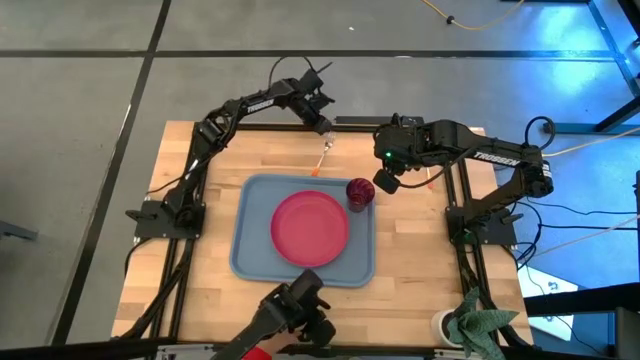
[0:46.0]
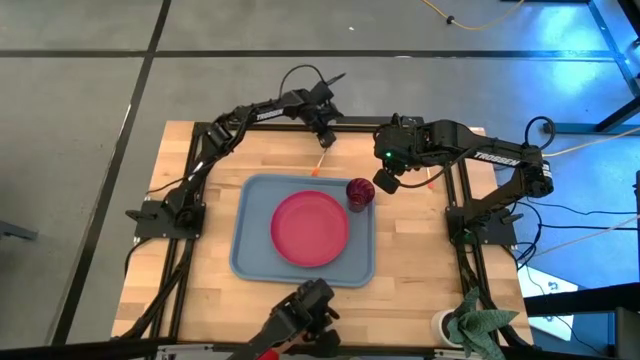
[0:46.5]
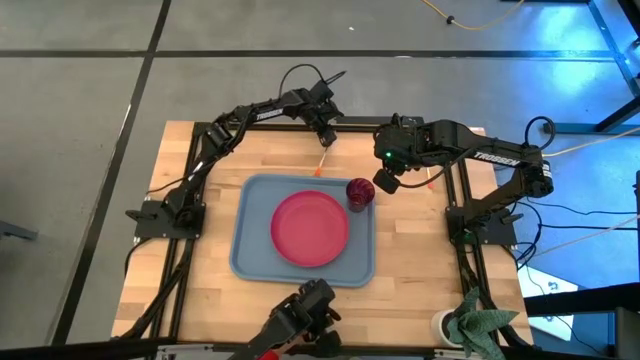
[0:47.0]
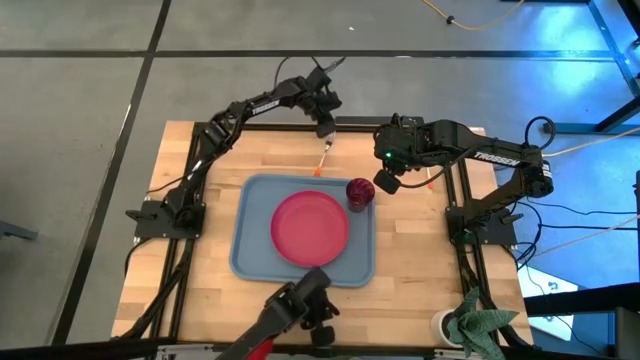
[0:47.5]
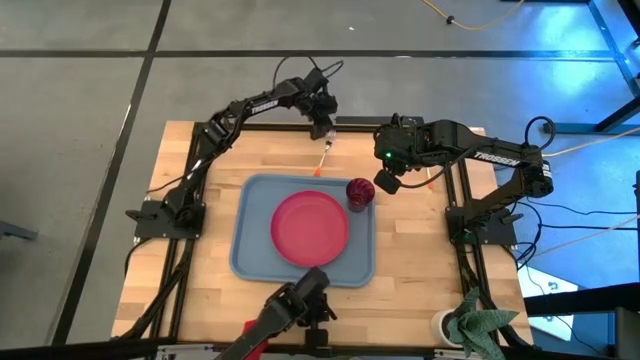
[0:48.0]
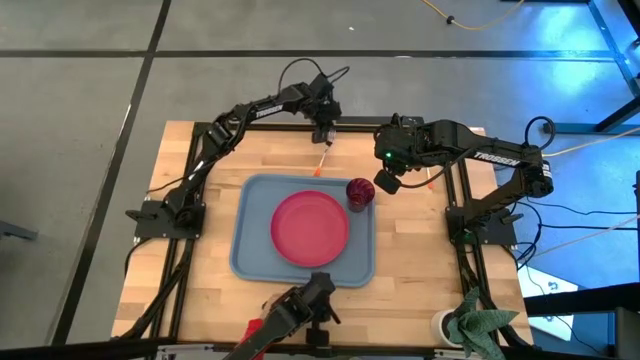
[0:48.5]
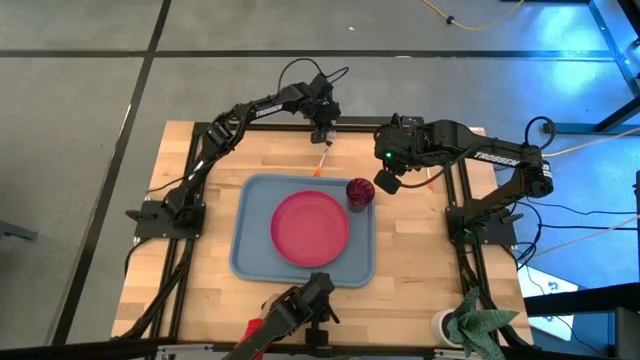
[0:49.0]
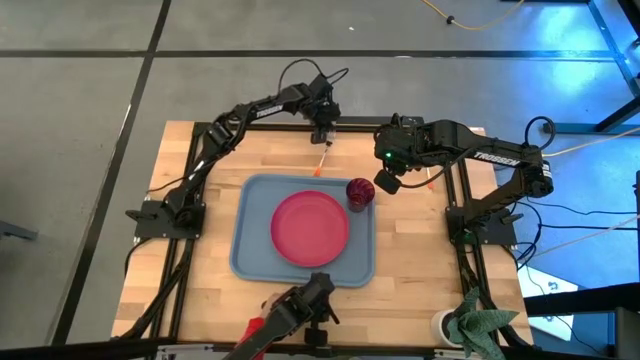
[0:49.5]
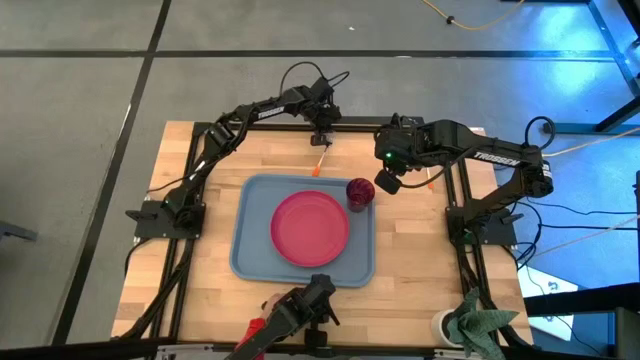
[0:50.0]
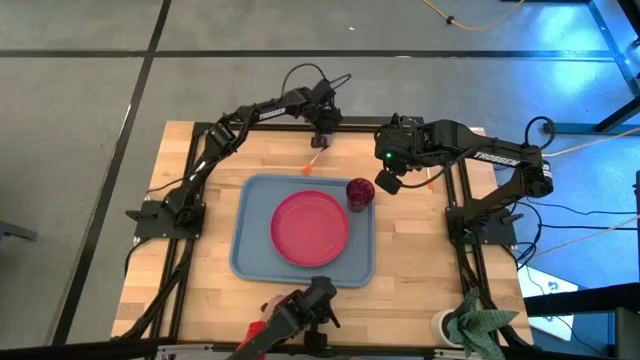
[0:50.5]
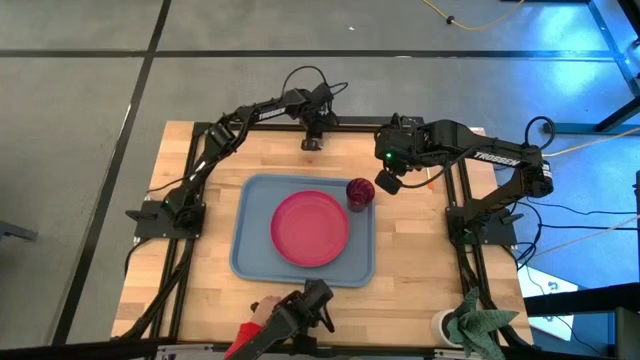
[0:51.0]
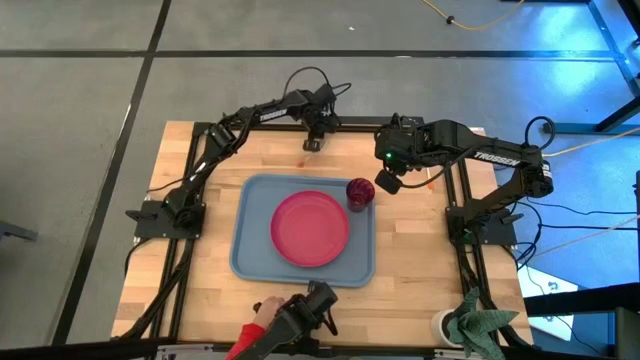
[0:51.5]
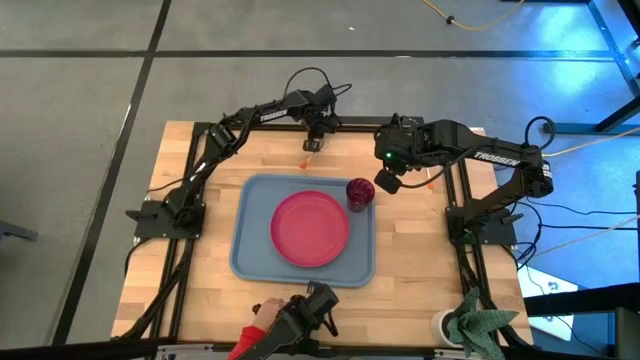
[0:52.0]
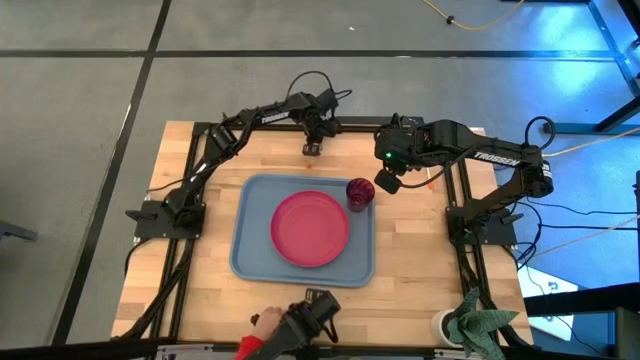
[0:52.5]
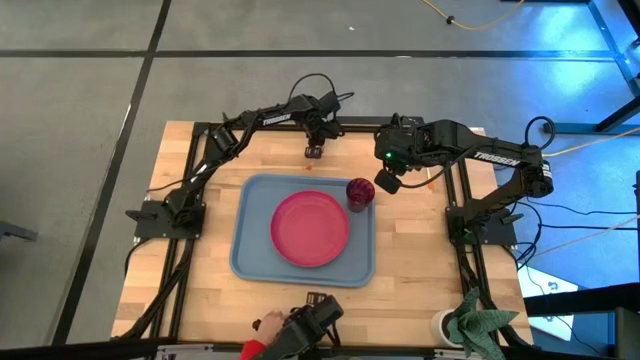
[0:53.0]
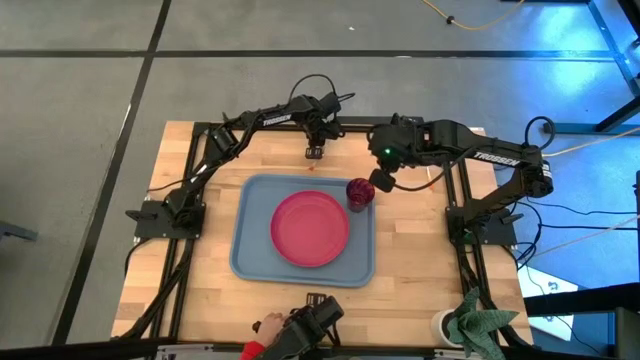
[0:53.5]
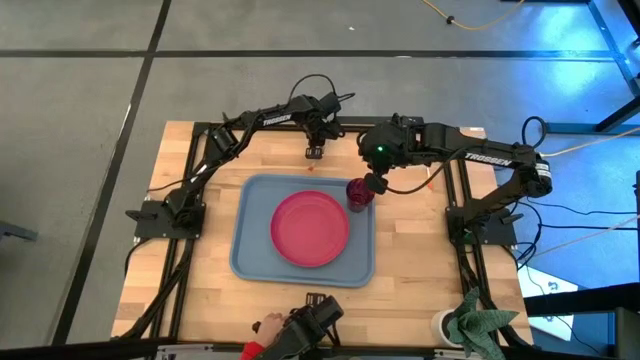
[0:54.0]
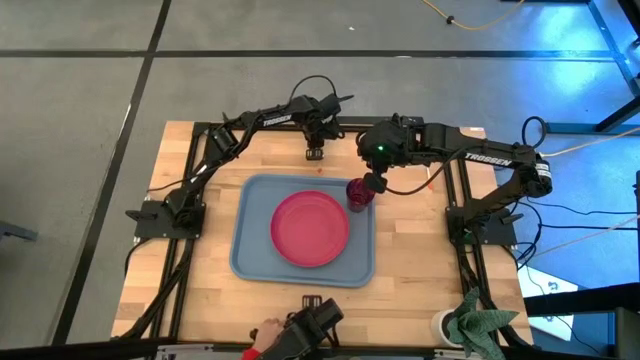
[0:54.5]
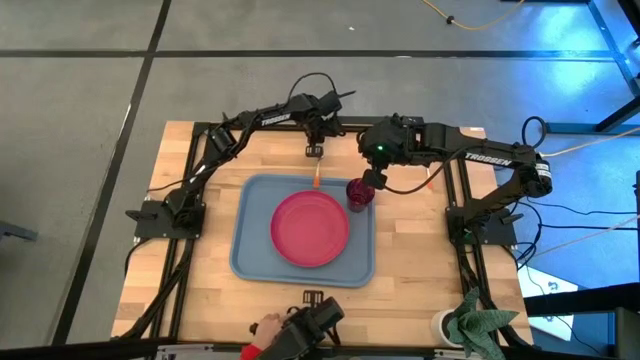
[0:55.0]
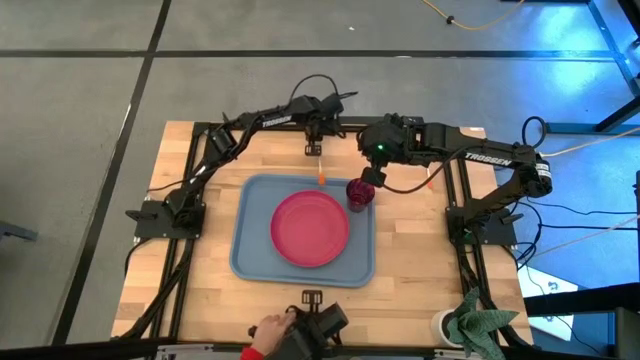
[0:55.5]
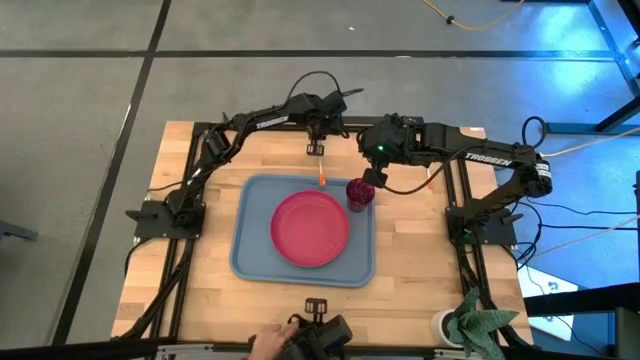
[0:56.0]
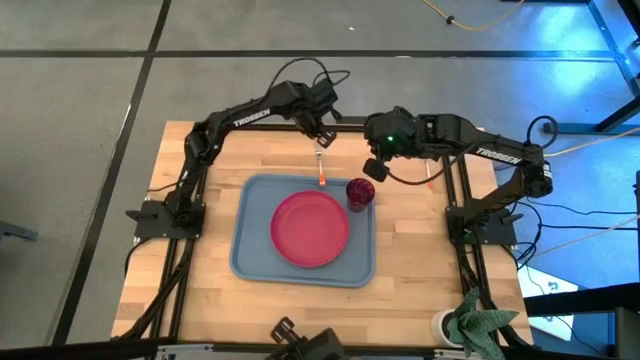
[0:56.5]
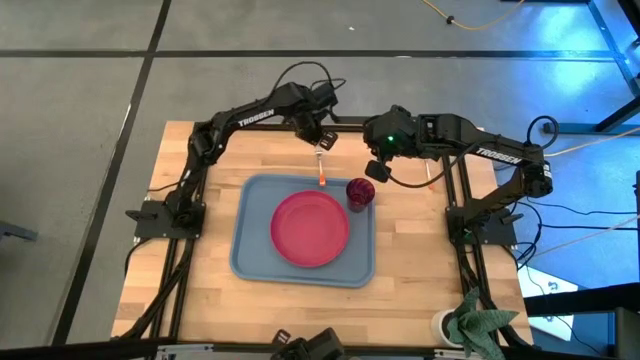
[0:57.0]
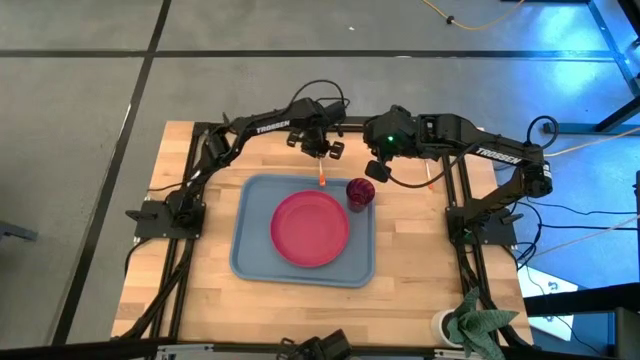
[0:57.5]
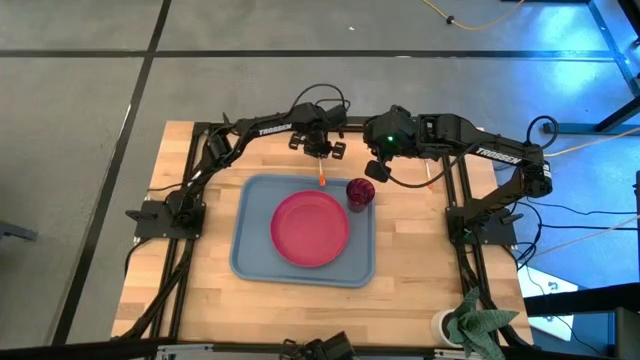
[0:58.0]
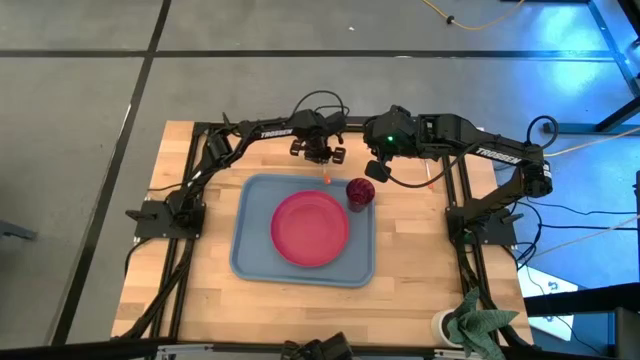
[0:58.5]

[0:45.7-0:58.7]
Task: Pick and place plate/cup/fork/spoon on tray
Put the orange fork on the blue serving tray to the left of the red plate

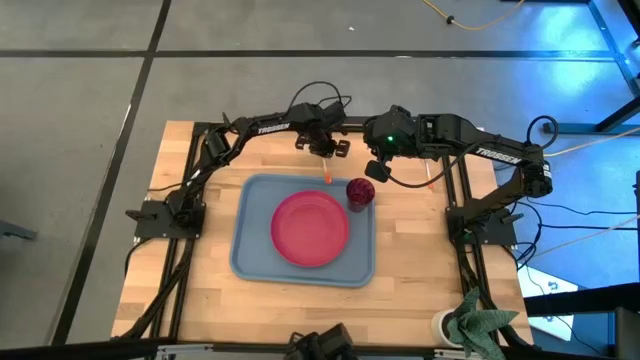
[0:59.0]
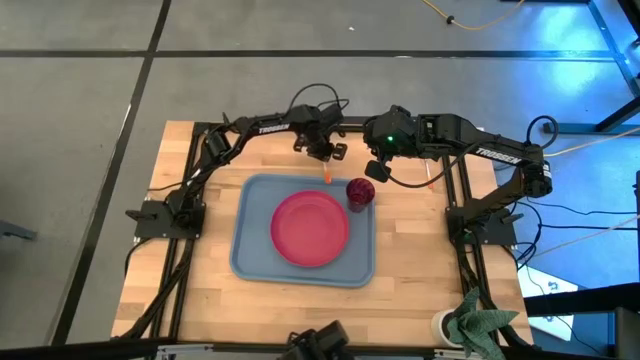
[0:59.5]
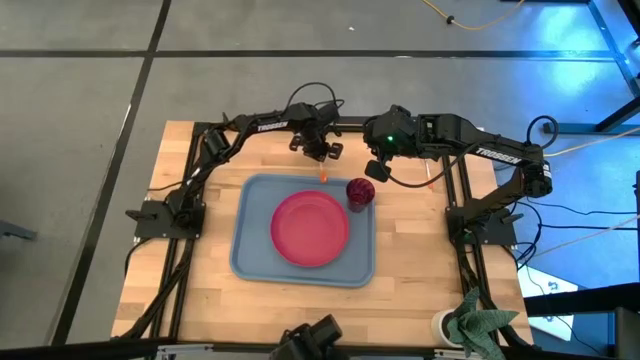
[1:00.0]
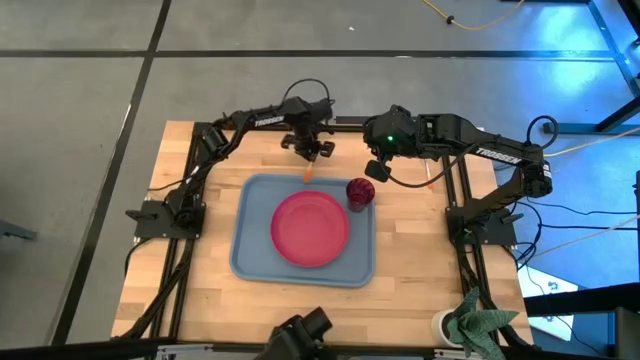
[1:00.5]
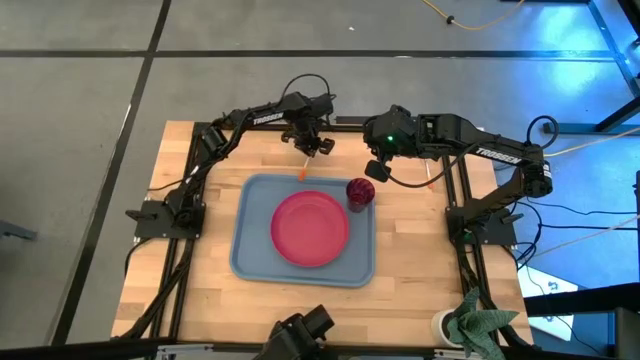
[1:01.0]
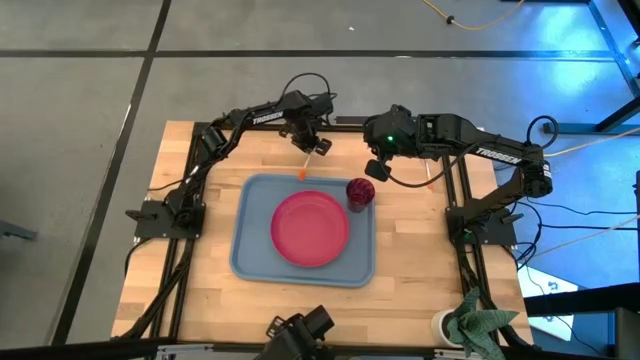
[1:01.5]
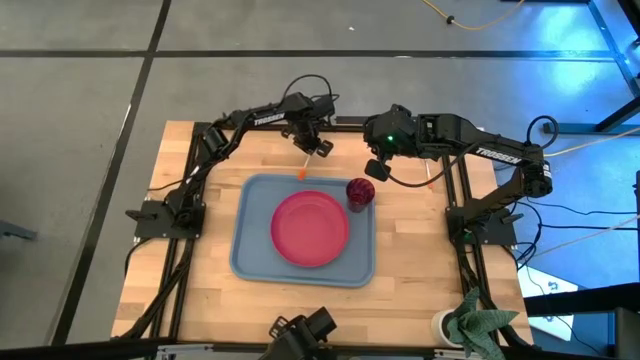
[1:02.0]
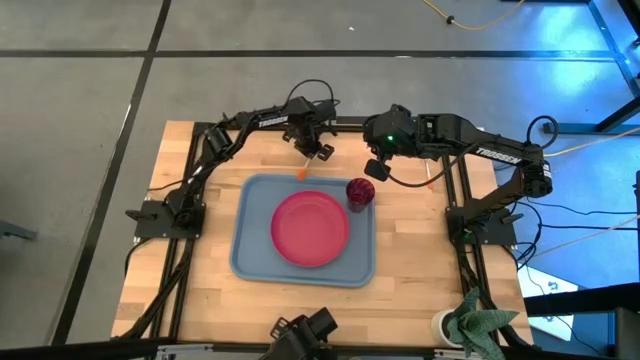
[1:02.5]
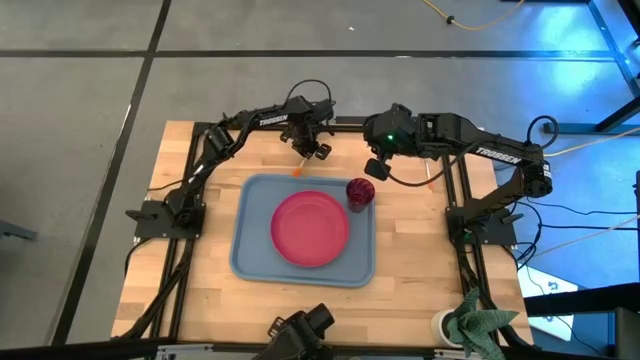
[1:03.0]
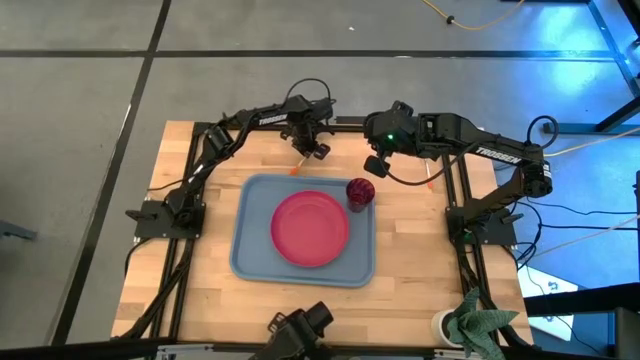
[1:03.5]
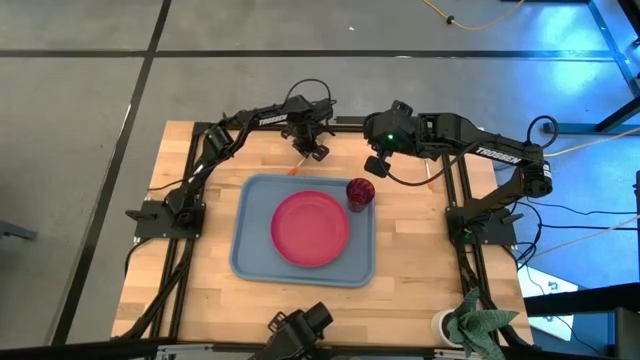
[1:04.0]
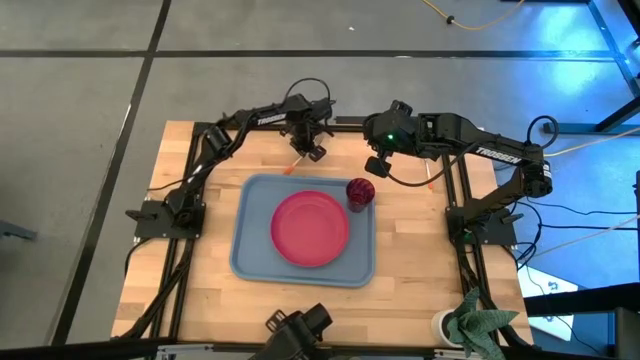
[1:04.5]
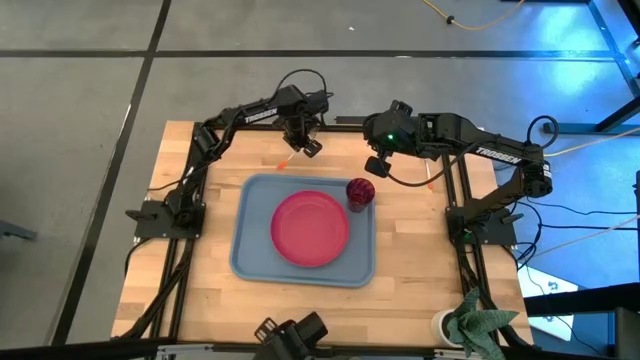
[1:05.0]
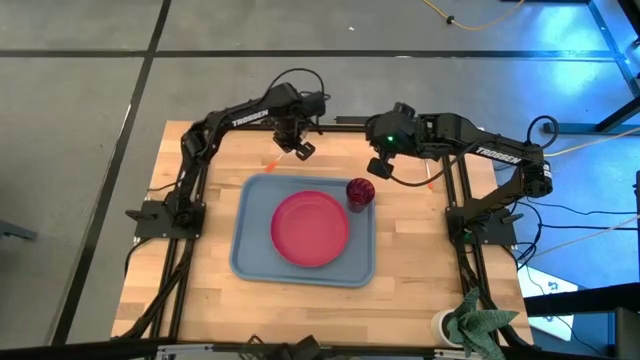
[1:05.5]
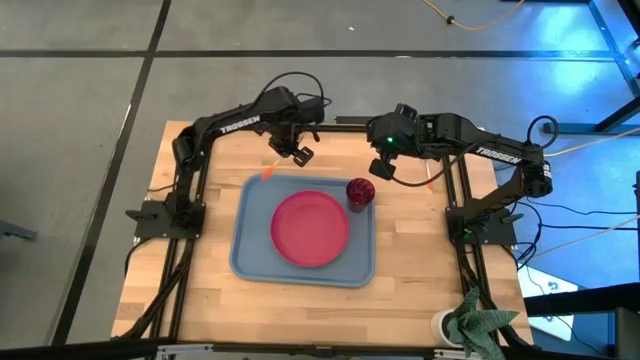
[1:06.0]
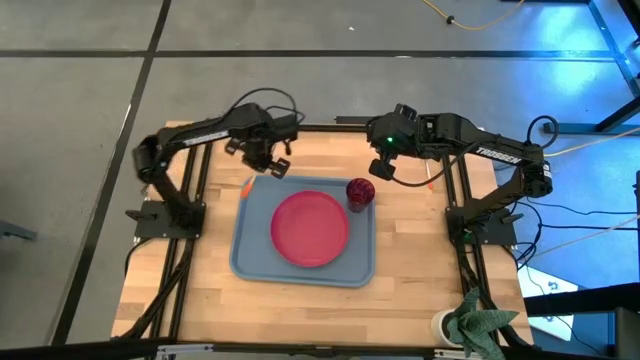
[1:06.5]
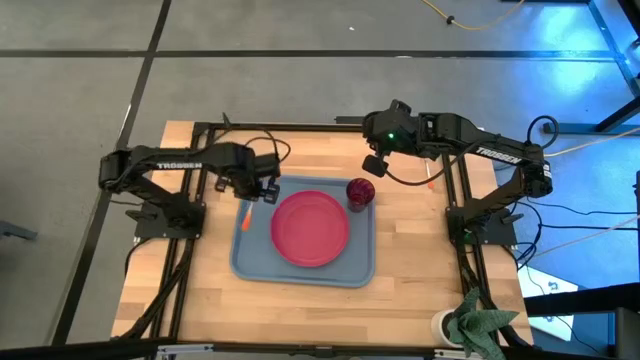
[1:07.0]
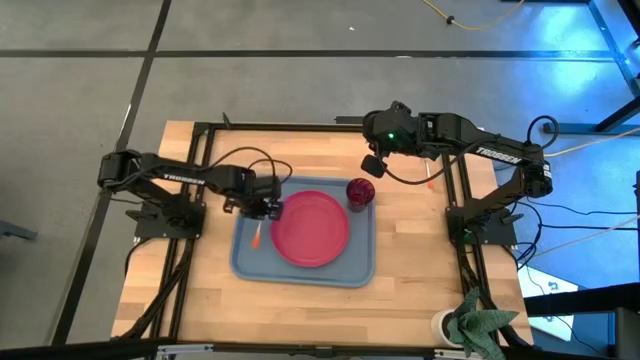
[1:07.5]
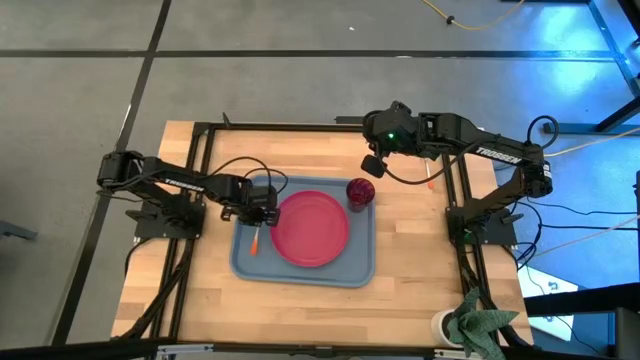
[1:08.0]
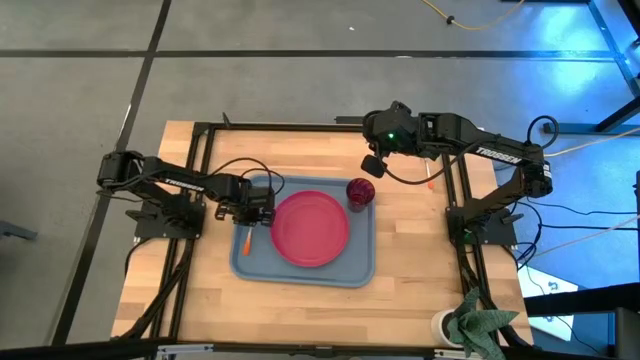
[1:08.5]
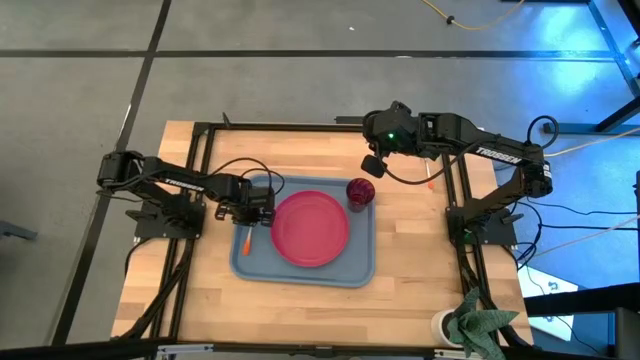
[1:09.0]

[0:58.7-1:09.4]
Put the orange fork on the blue serving tray to the left of the red plate
